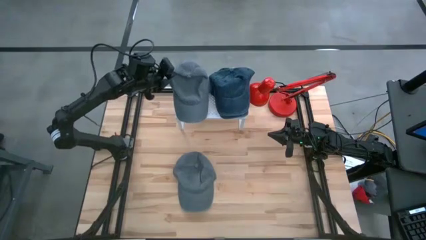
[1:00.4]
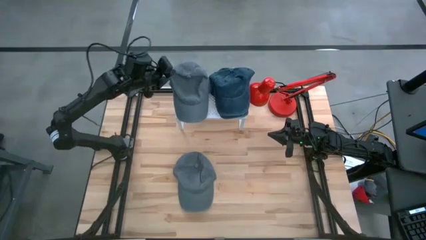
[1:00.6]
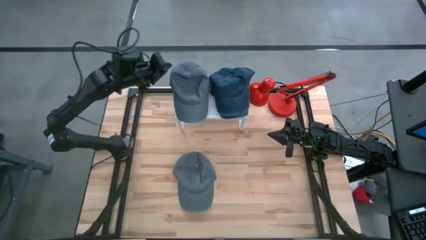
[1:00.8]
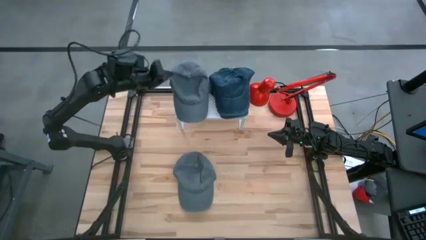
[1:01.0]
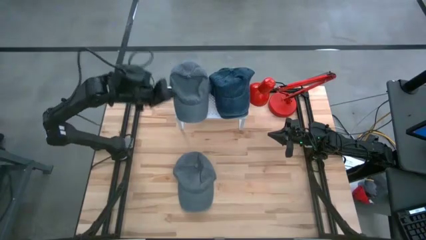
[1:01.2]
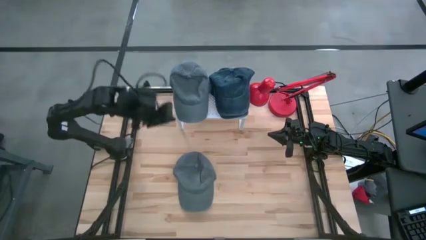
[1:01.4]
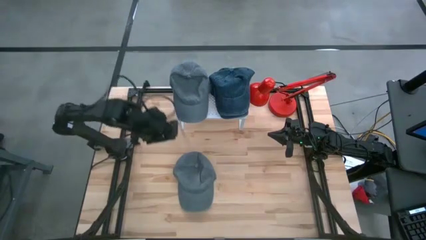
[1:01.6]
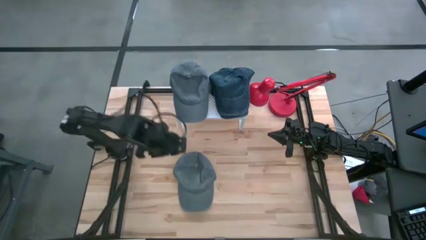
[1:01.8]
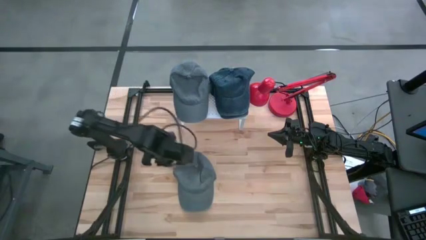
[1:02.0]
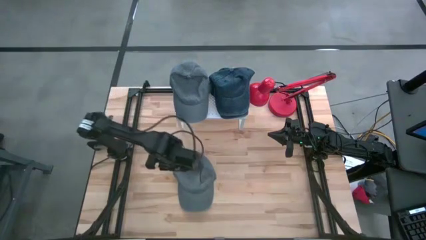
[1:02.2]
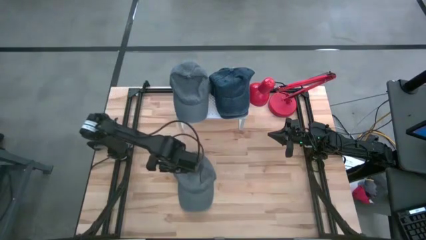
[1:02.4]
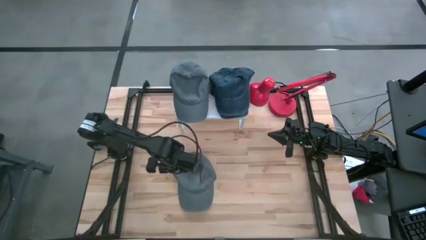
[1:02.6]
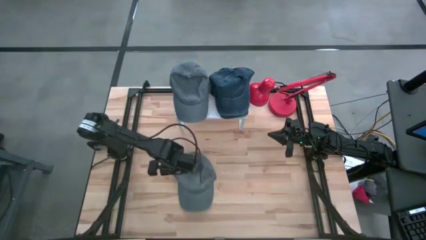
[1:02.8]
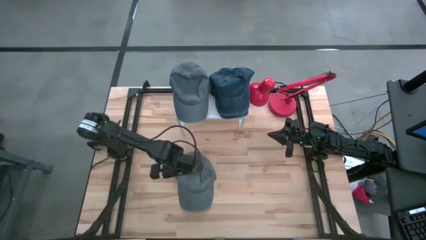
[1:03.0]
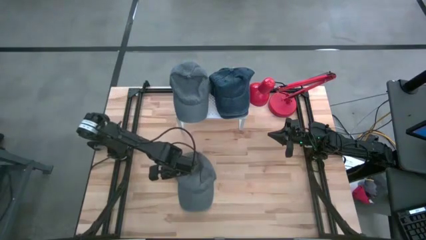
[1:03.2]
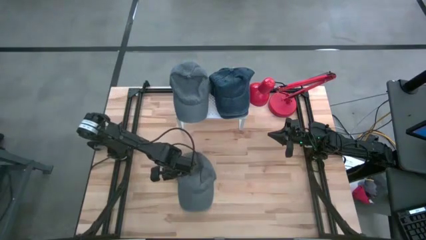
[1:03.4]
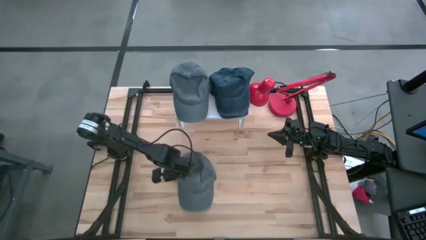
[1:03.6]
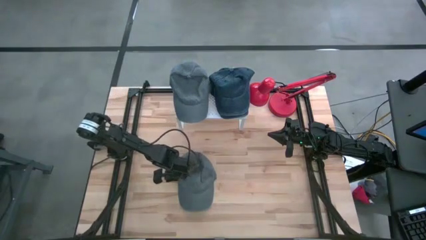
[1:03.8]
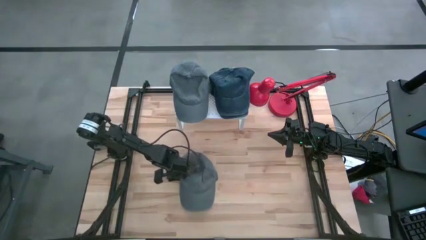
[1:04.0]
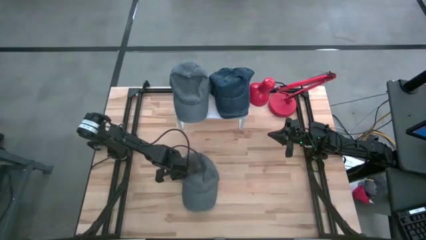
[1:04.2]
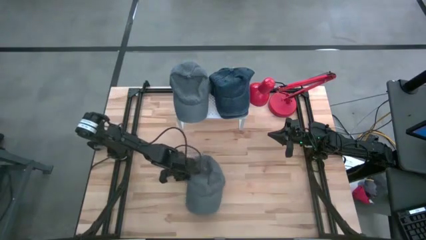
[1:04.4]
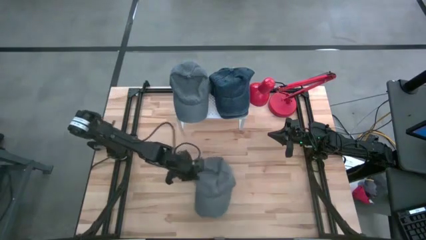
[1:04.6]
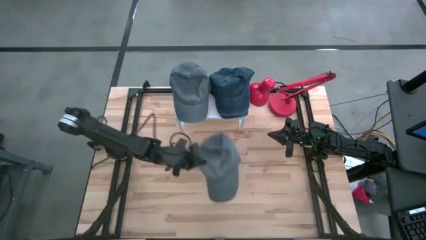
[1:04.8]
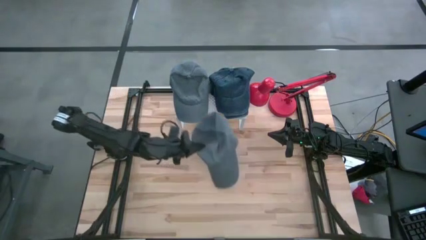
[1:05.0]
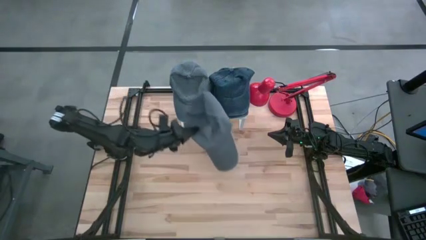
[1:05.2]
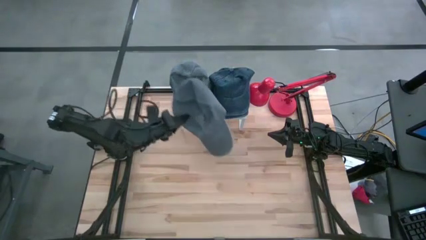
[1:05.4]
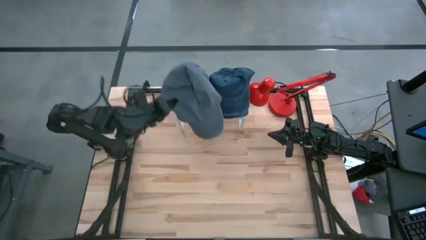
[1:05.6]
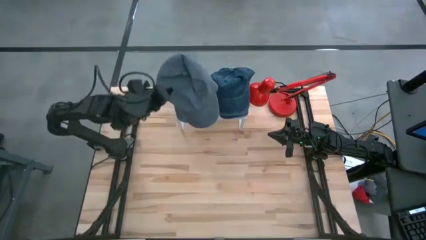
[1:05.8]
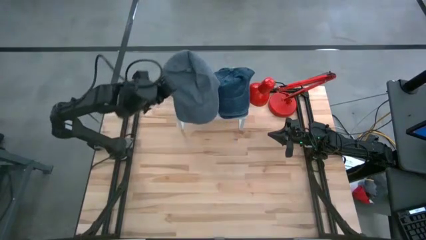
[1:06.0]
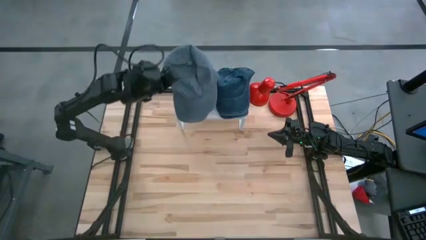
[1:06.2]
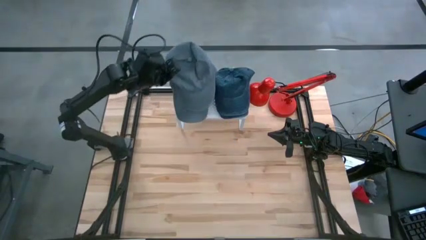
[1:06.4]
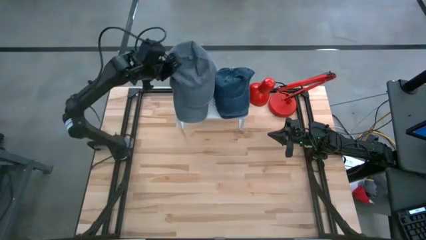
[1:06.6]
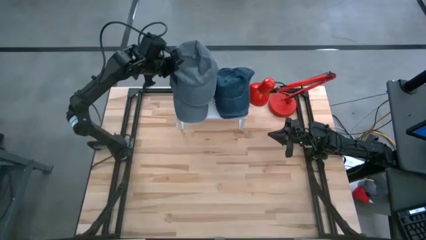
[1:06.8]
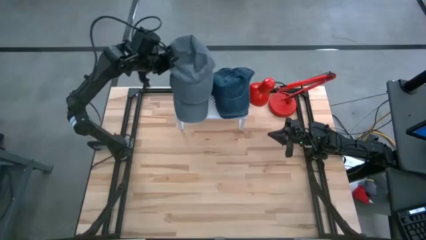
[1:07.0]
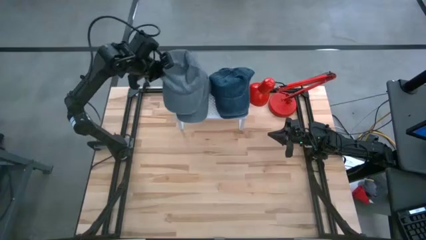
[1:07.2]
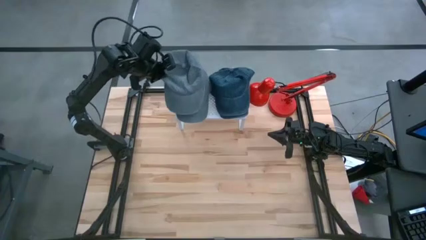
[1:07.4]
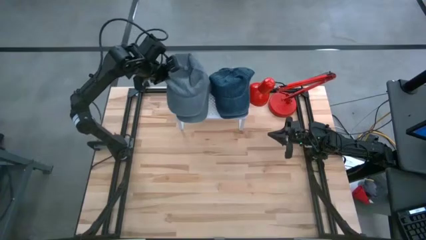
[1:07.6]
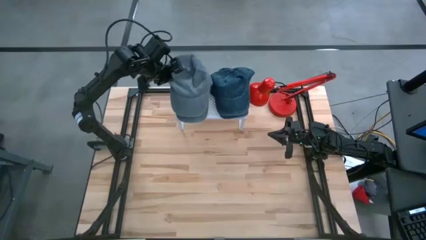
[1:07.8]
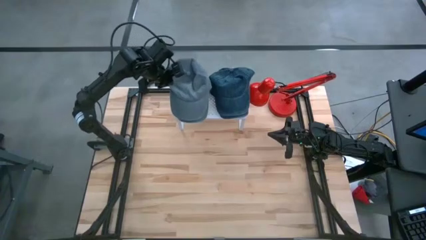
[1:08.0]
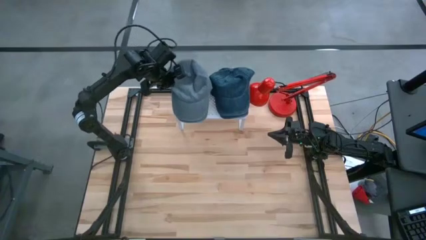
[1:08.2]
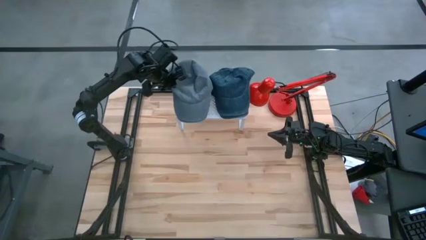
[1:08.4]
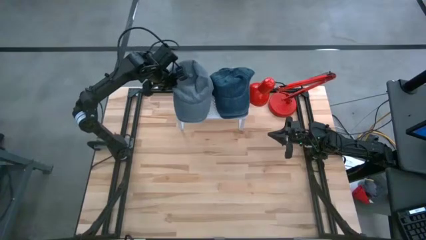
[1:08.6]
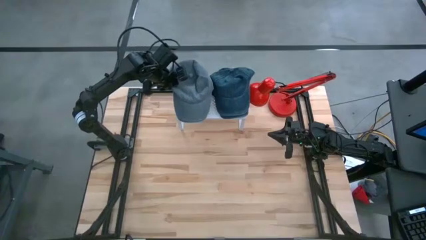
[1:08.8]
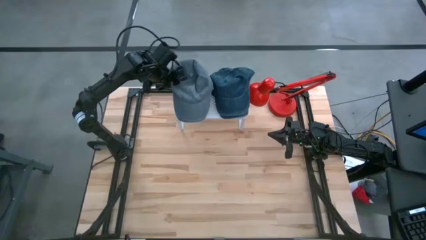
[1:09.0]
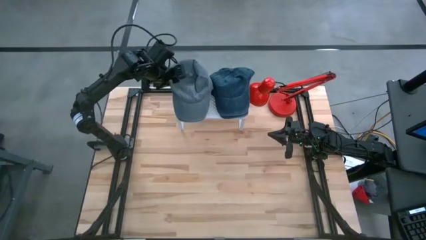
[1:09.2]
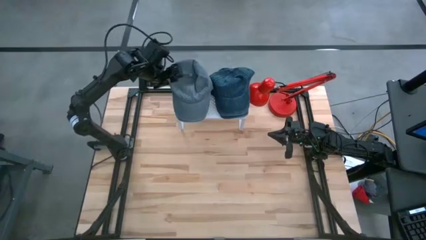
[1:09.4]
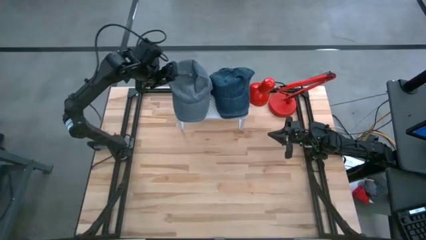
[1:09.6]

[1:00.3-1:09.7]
Task: Pick & Place hat
Stack the gray cap on top of the gray cap on the shelf

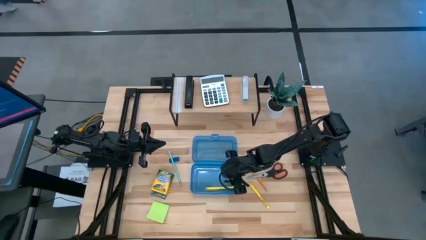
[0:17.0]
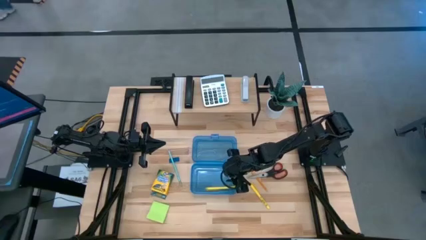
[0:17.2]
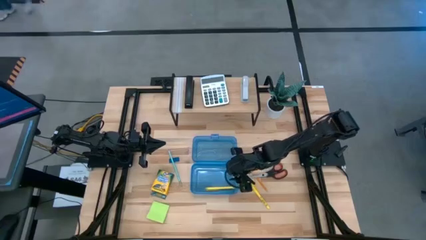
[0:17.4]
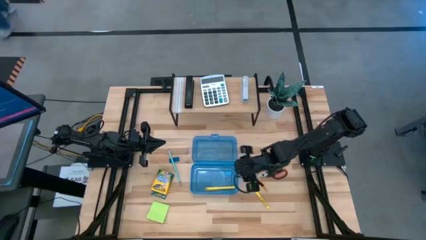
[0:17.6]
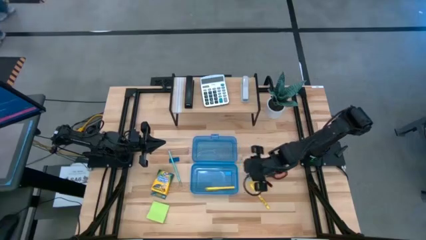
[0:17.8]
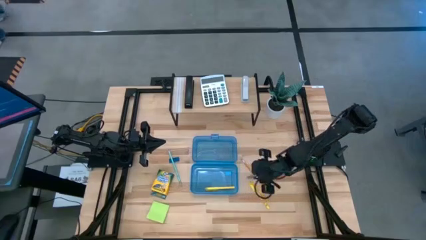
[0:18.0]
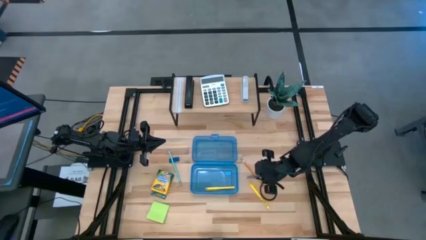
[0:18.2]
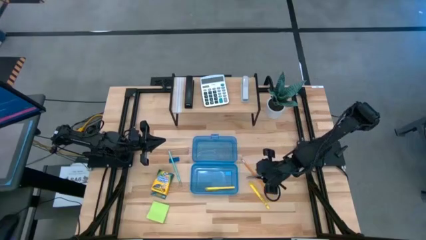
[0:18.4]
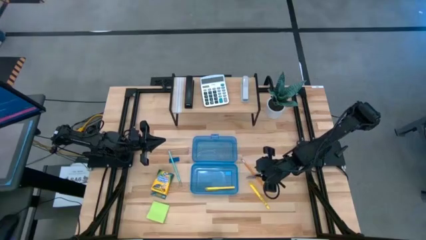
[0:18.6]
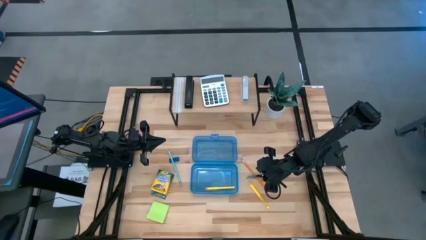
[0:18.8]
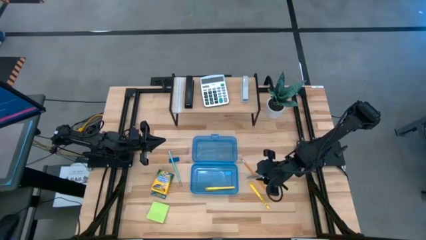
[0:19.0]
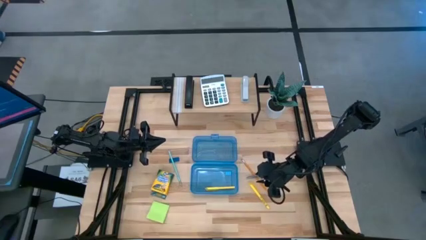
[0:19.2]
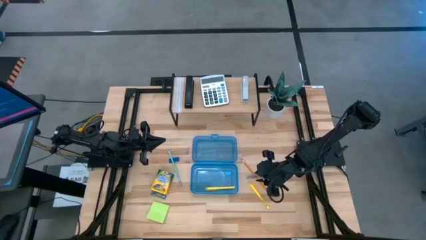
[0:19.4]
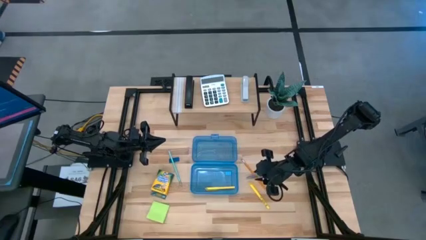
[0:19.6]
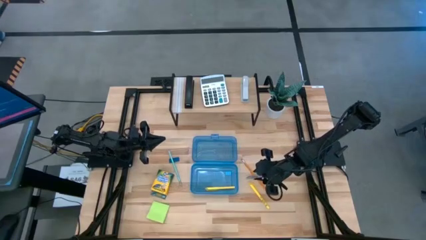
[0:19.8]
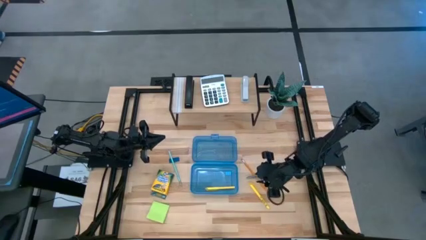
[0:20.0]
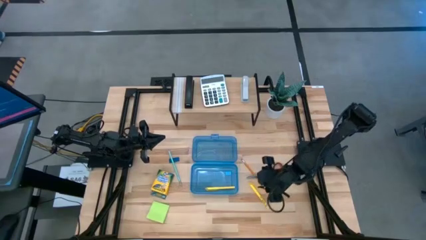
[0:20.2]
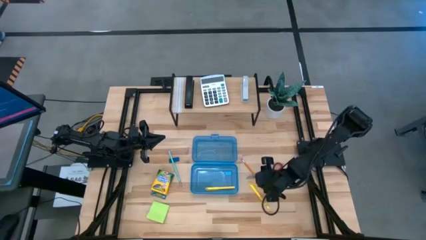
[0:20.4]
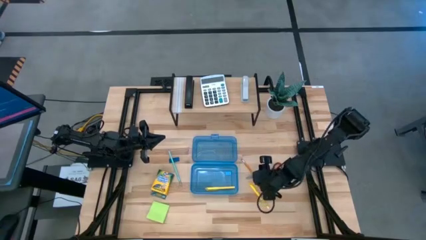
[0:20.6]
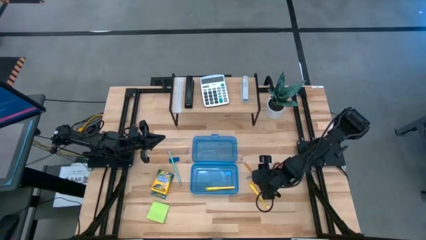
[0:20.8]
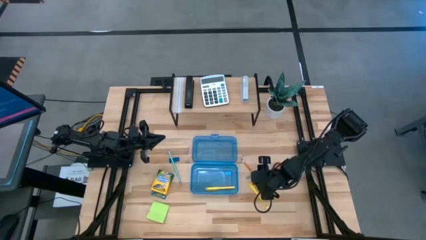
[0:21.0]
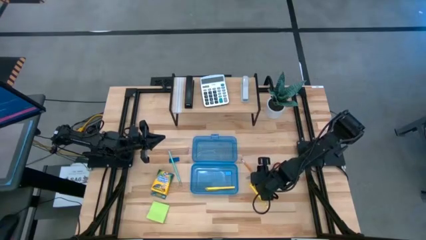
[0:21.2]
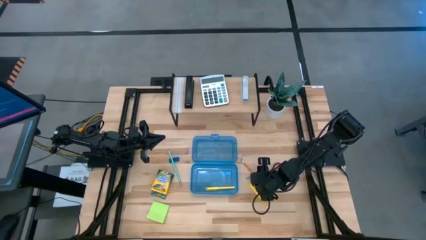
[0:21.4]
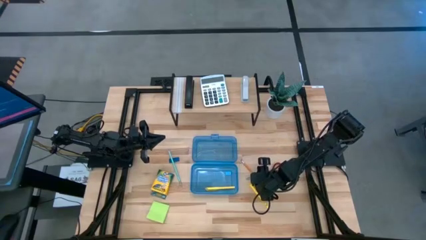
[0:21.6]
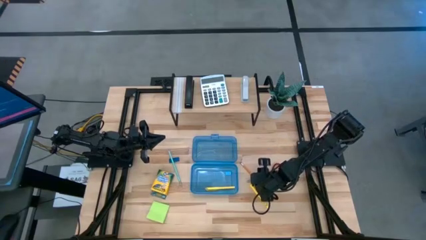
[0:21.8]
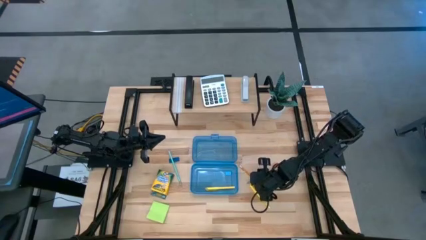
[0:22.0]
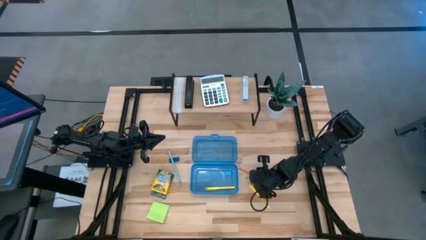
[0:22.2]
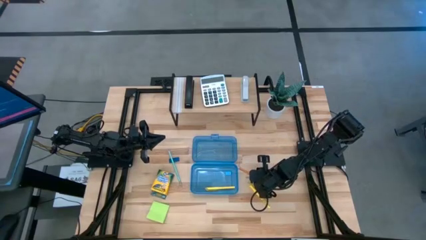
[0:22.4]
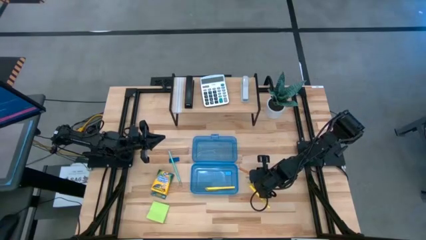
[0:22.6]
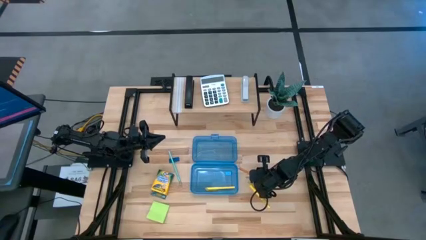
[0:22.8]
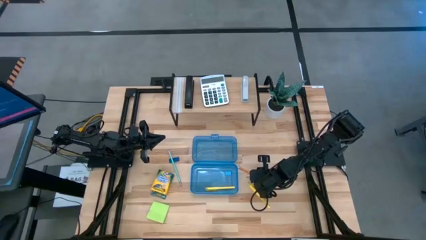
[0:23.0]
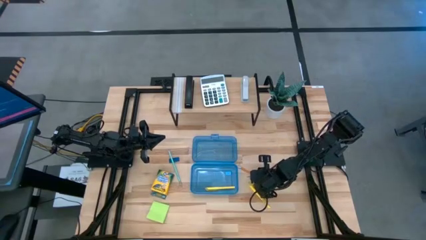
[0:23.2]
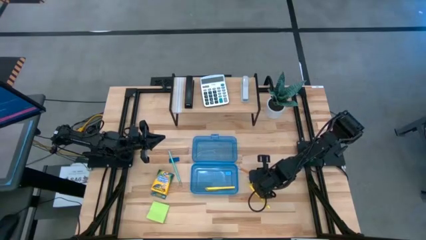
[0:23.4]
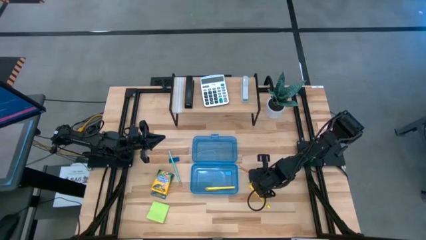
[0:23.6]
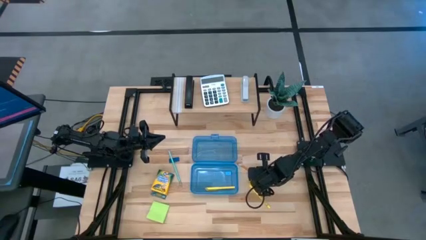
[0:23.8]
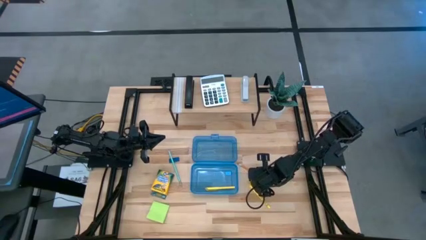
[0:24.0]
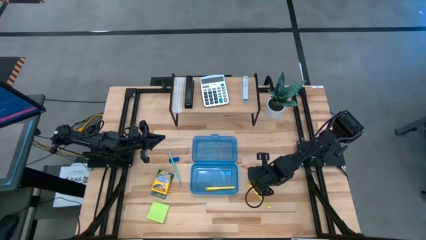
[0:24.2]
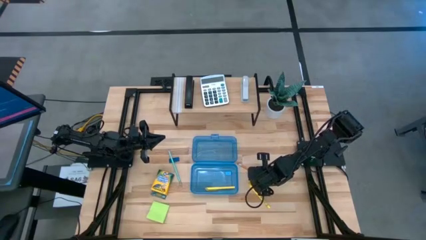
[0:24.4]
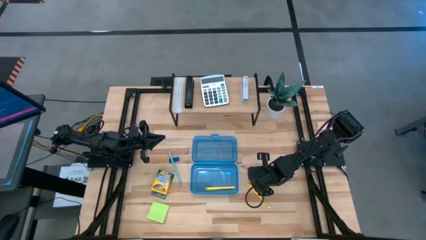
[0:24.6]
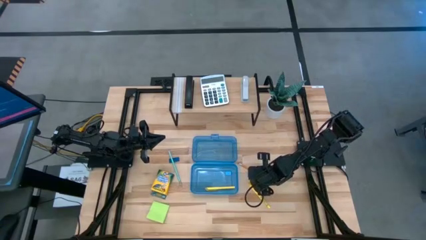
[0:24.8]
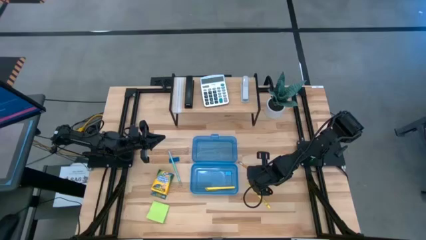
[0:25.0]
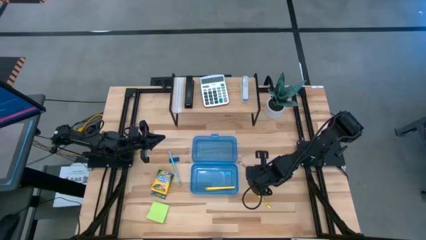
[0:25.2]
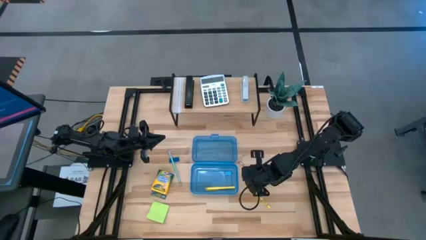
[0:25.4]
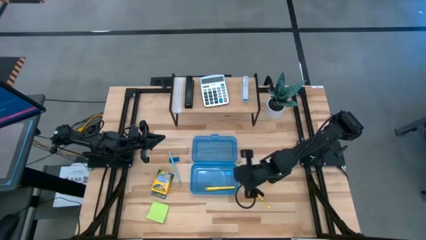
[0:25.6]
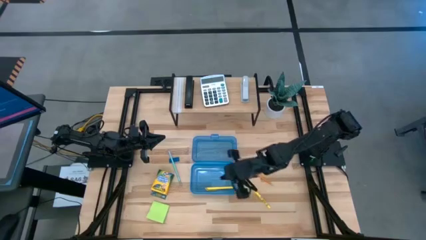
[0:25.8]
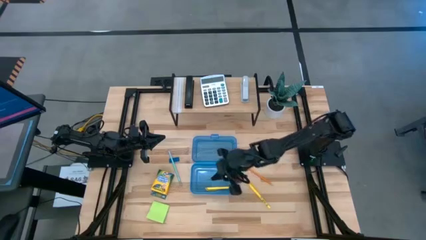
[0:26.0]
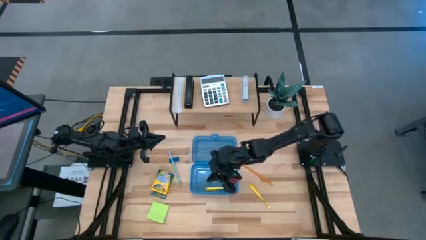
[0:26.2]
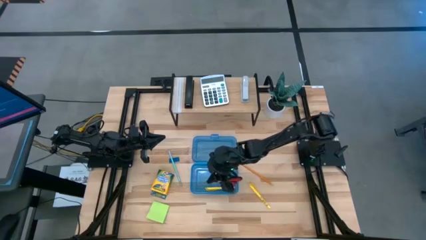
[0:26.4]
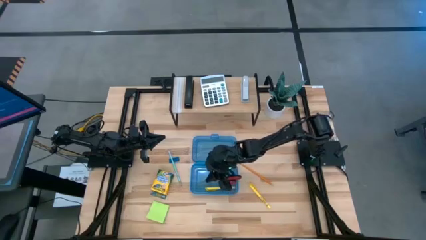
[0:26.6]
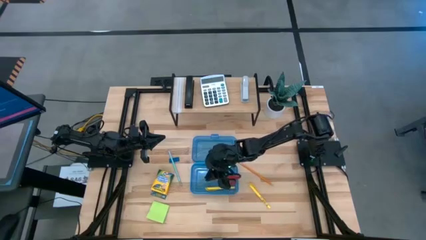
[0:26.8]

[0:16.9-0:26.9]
Task: Pack school essentials
Put the black scissors into the blue supply box
